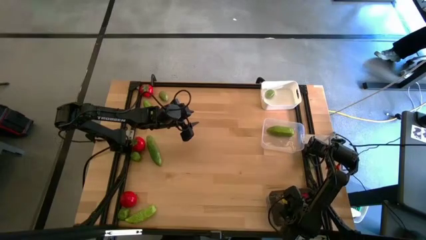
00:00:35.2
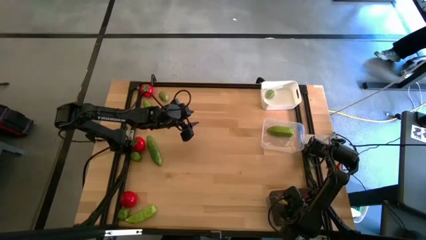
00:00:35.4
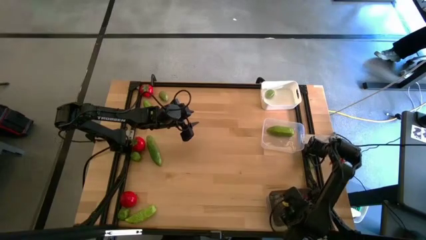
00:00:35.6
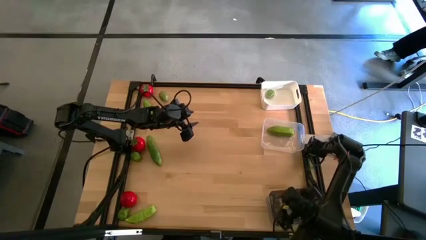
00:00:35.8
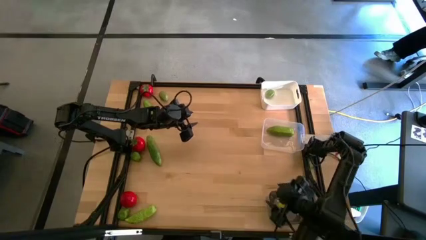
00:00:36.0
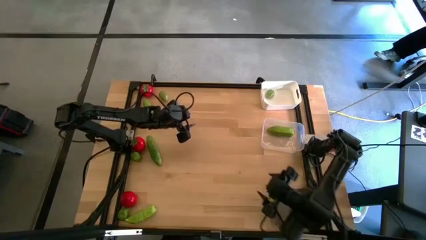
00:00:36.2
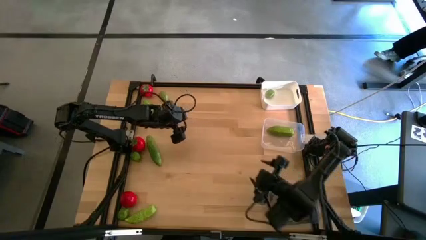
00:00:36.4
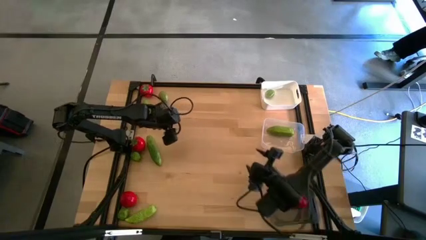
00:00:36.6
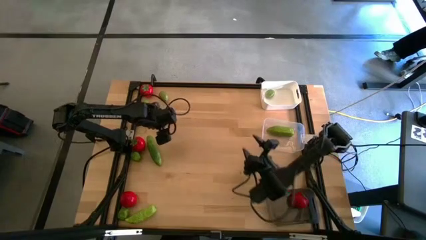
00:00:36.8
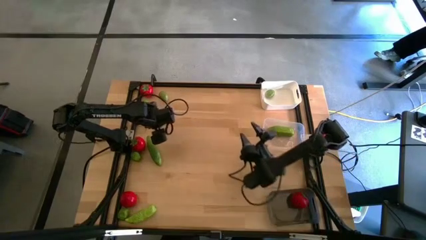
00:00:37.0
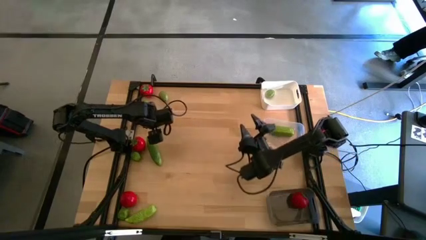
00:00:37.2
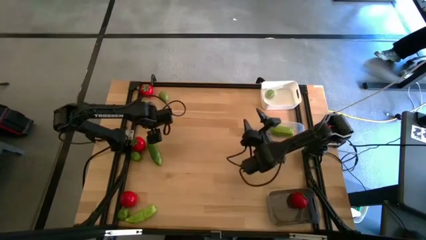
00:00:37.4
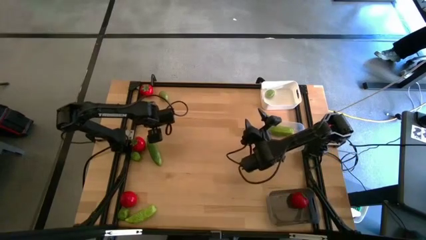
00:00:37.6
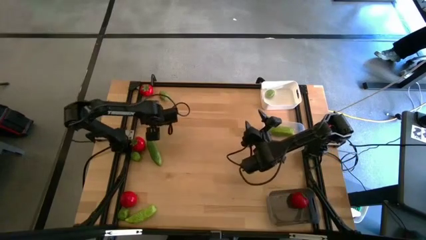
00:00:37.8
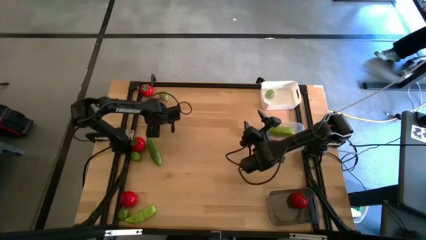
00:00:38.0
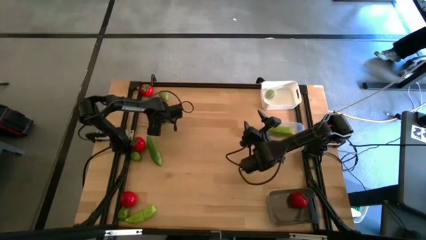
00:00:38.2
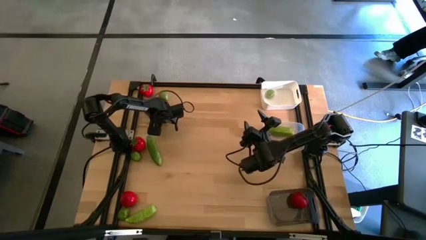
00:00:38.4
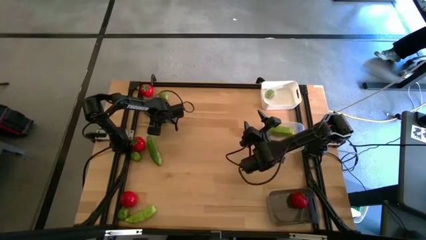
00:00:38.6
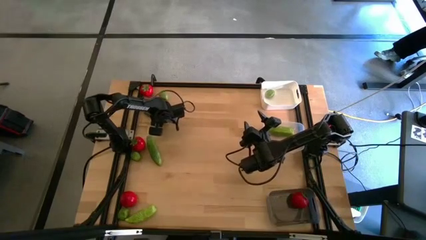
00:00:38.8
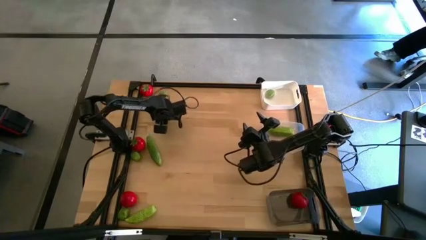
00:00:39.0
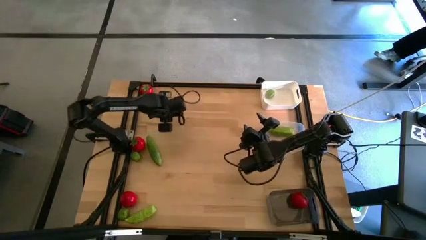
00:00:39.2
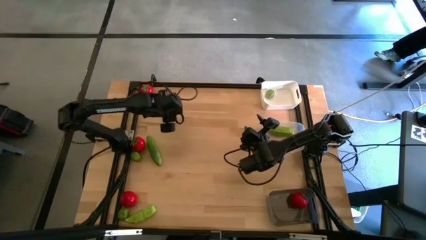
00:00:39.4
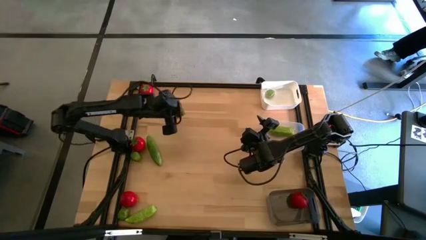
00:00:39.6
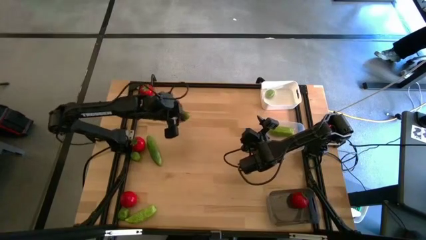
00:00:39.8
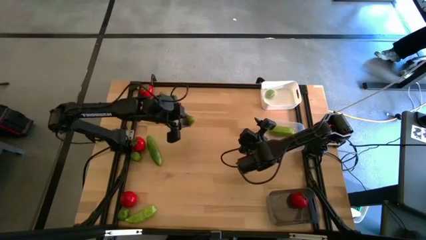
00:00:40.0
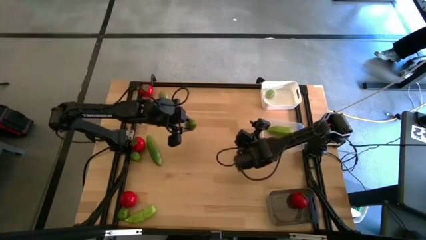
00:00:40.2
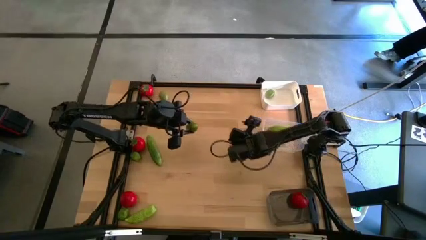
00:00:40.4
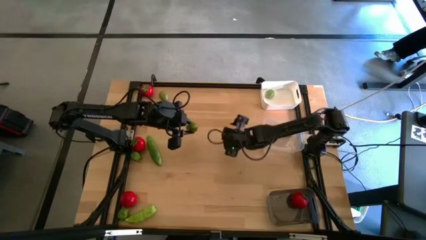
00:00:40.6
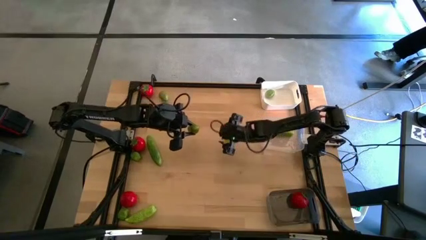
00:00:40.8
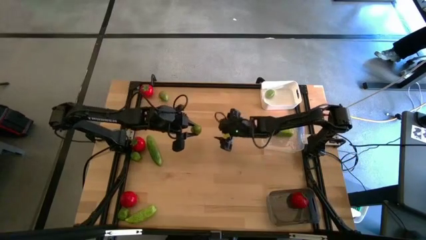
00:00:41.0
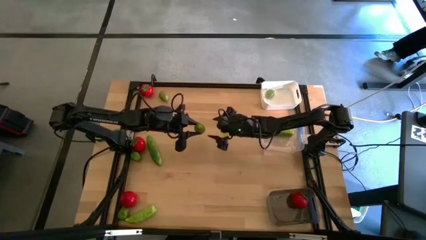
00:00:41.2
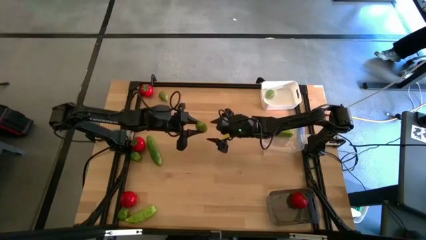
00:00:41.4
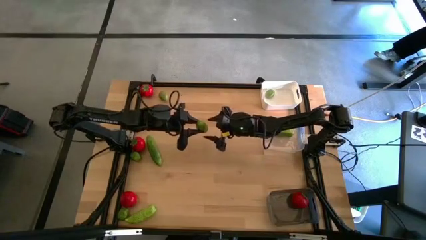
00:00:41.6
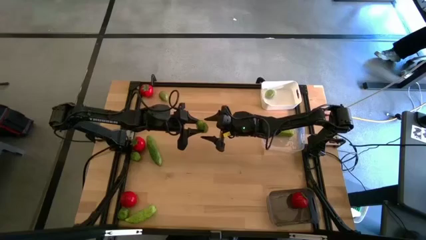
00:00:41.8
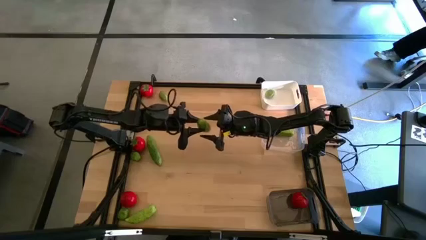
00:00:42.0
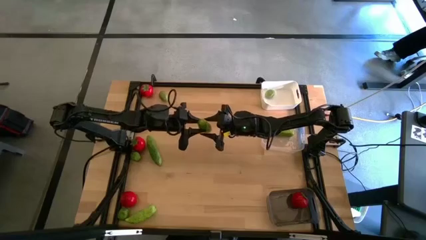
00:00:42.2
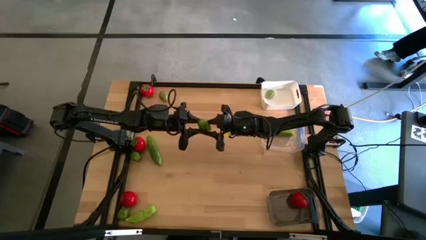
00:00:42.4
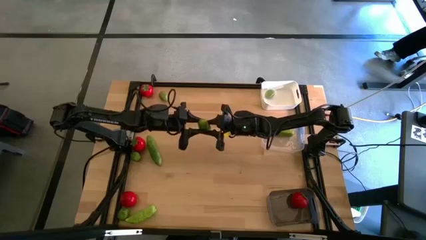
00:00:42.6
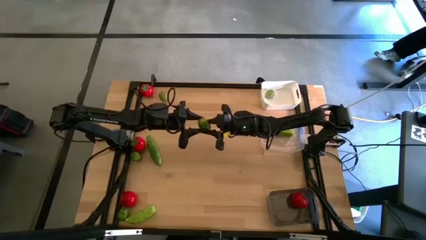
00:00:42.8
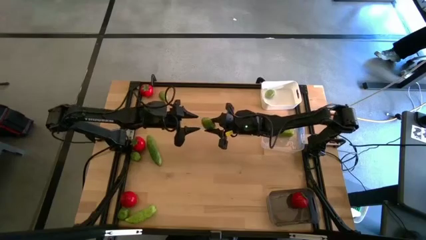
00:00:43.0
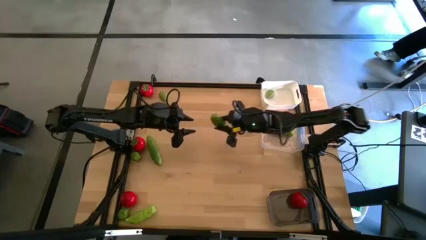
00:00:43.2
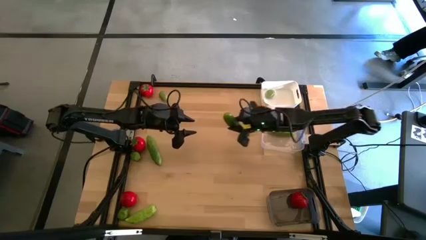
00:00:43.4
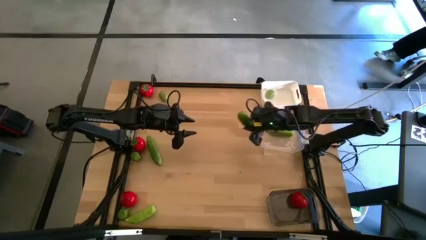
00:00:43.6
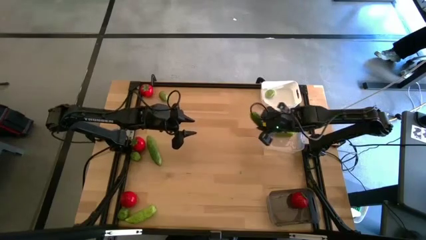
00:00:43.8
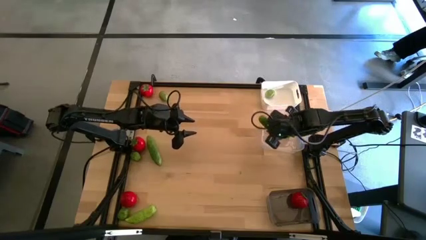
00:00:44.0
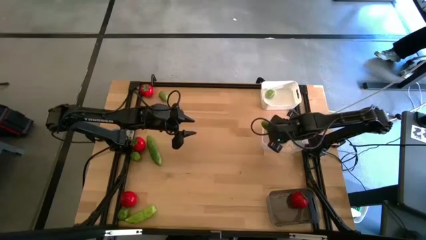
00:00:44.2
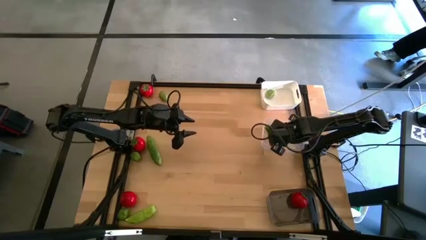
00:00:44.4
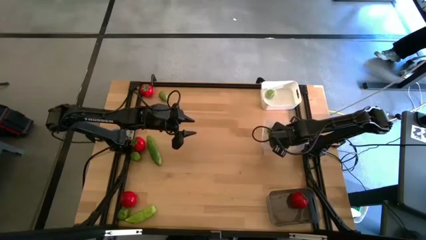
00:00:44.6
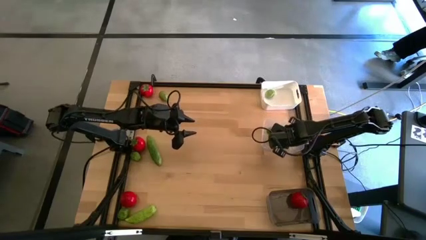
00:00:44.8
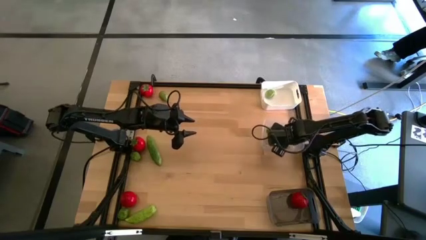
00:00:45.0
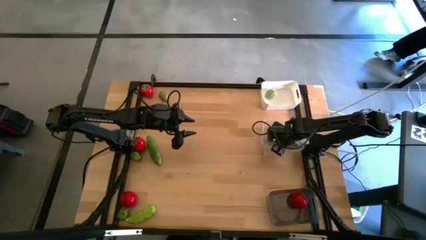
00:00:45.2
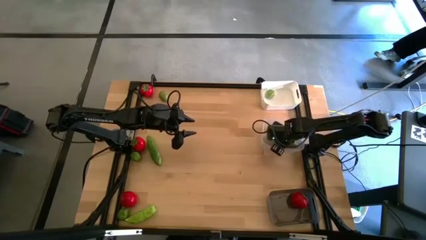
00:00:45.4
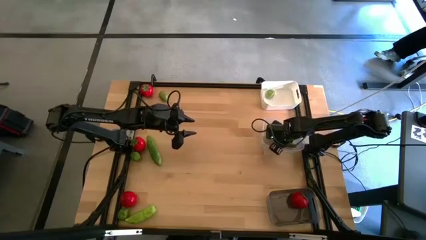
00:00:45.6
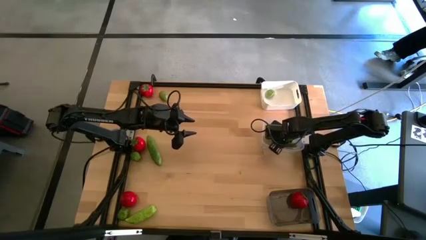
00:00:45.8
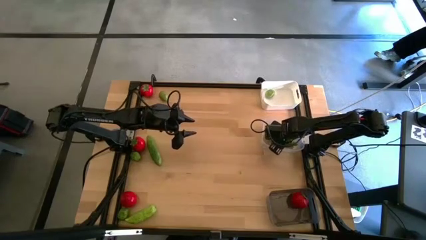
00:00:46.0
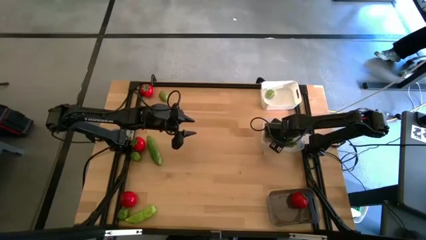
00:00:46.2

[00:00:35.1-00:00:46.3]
Task: Sort produce into baskets
Put the top cucumber into the transparent bin
